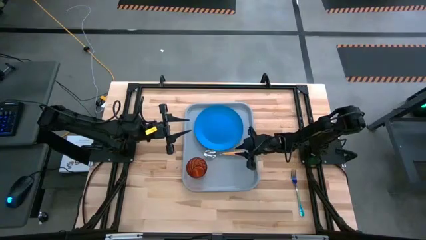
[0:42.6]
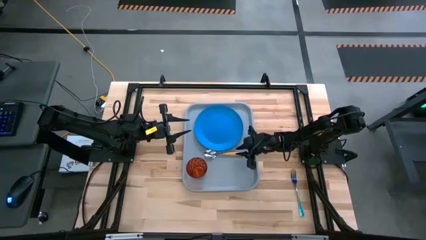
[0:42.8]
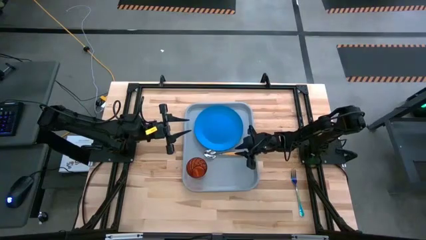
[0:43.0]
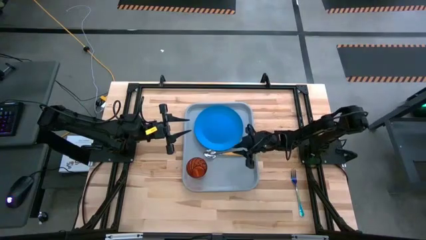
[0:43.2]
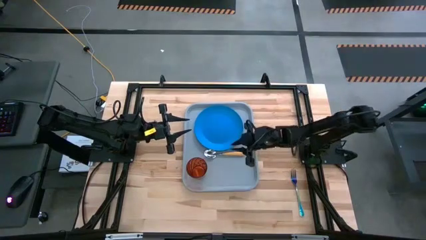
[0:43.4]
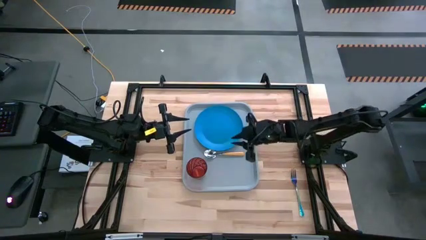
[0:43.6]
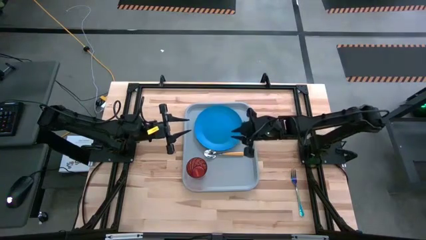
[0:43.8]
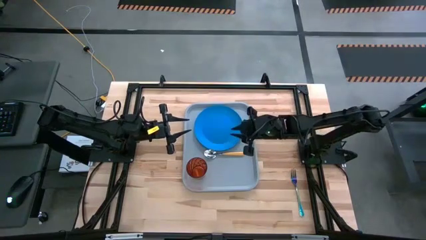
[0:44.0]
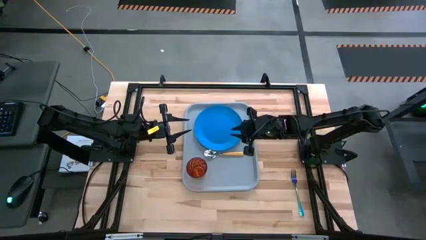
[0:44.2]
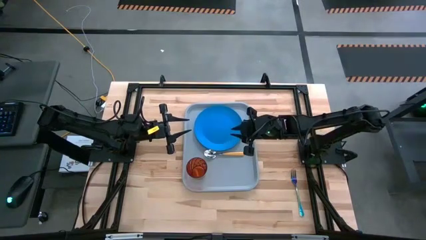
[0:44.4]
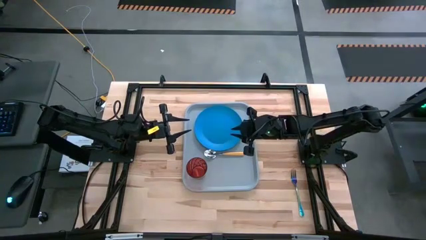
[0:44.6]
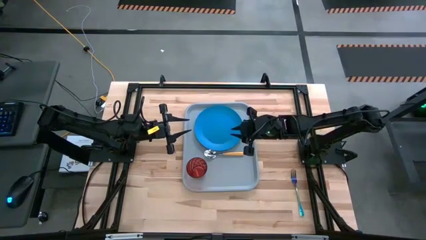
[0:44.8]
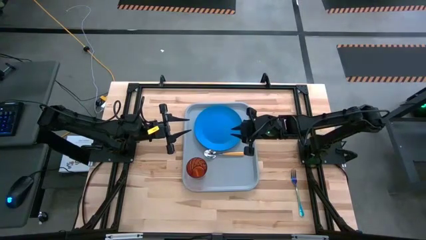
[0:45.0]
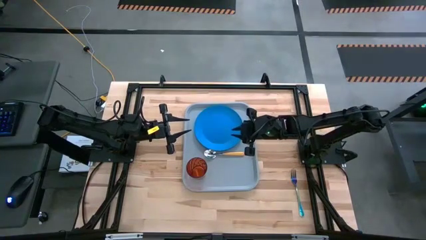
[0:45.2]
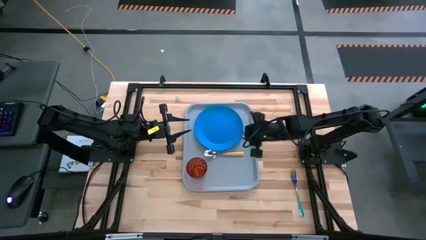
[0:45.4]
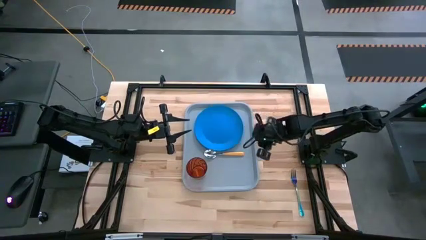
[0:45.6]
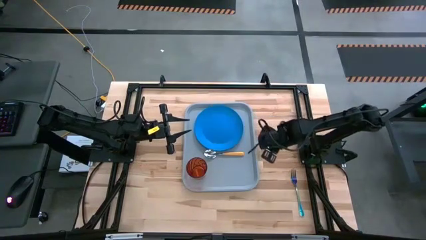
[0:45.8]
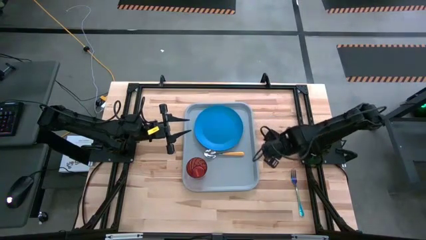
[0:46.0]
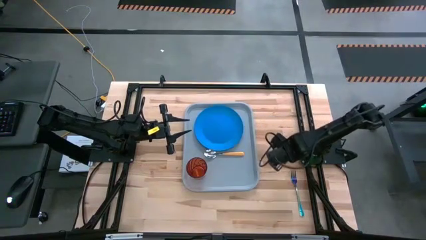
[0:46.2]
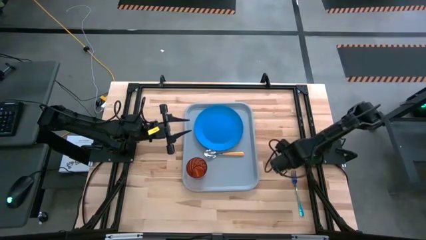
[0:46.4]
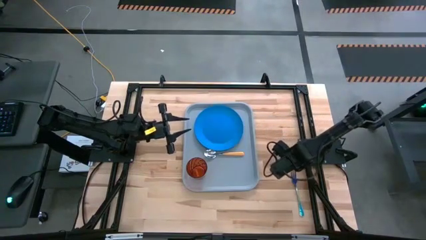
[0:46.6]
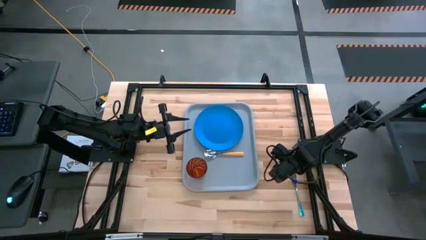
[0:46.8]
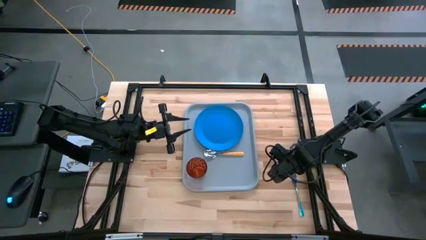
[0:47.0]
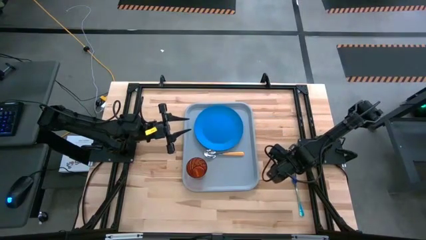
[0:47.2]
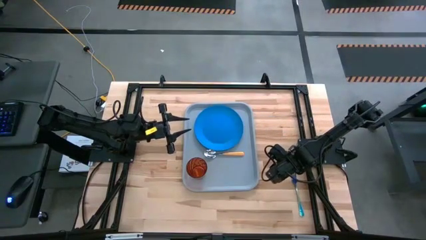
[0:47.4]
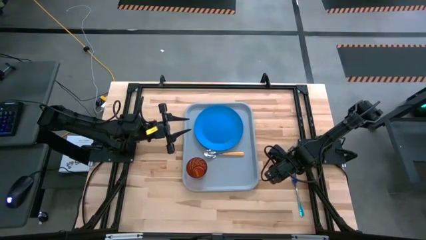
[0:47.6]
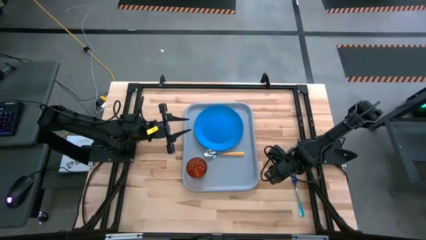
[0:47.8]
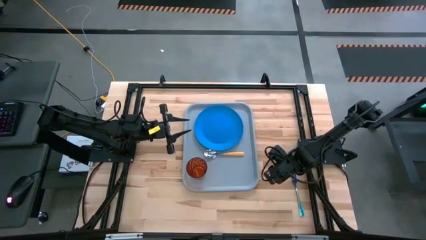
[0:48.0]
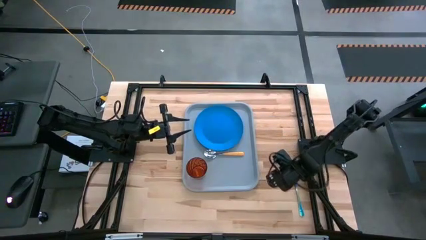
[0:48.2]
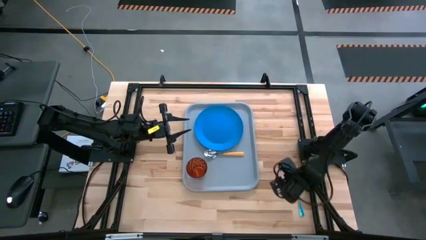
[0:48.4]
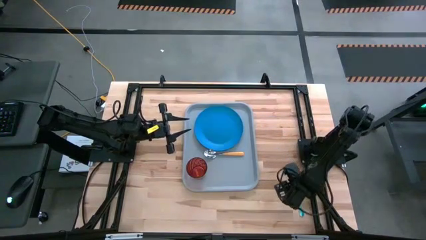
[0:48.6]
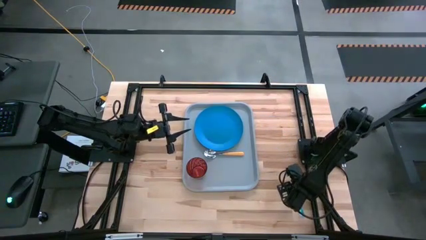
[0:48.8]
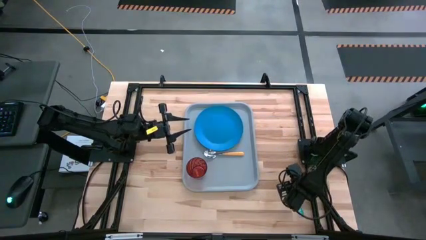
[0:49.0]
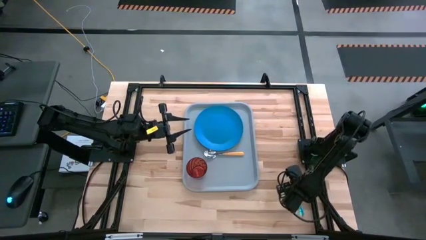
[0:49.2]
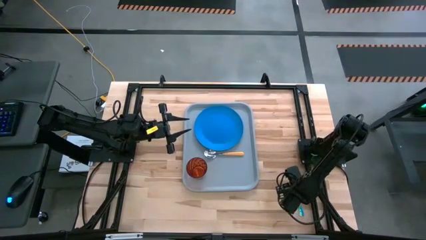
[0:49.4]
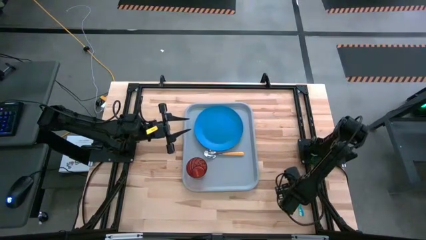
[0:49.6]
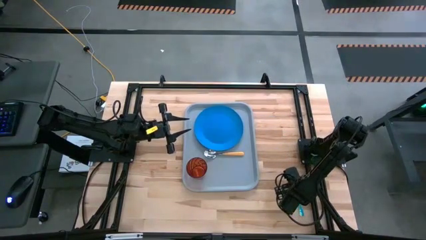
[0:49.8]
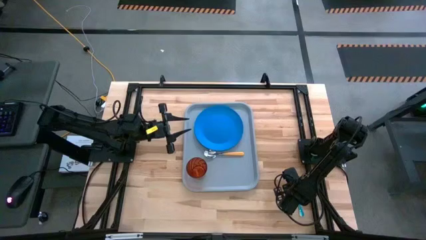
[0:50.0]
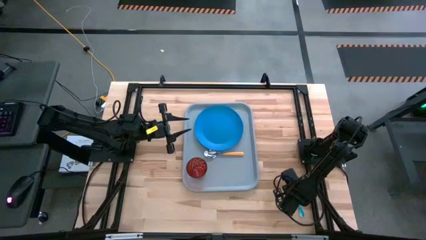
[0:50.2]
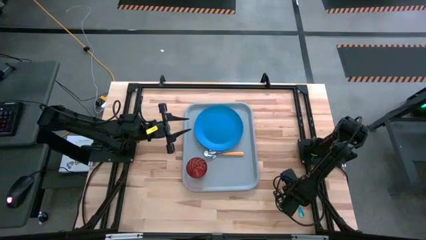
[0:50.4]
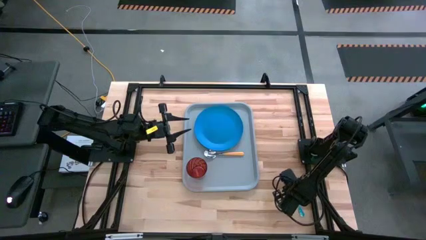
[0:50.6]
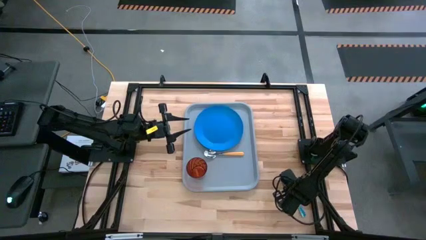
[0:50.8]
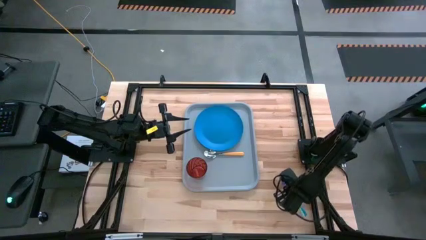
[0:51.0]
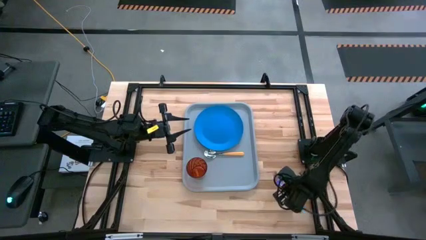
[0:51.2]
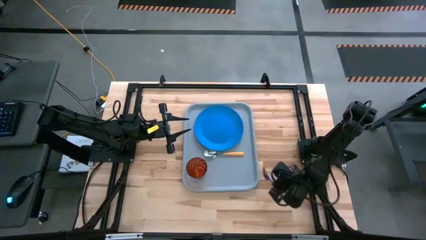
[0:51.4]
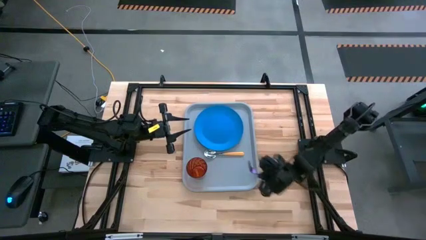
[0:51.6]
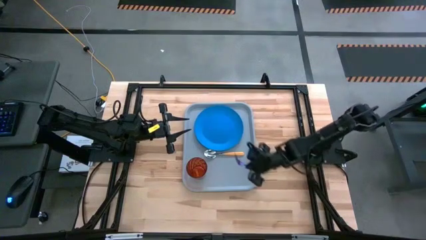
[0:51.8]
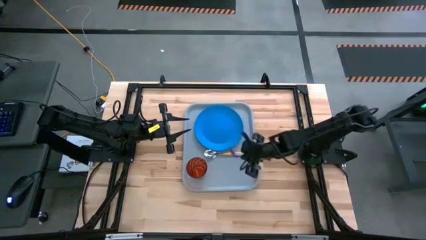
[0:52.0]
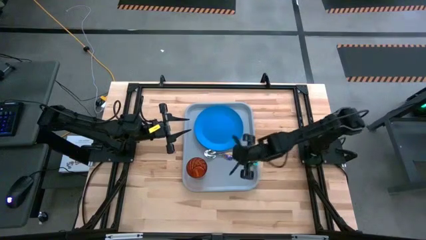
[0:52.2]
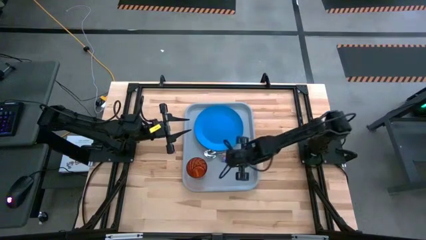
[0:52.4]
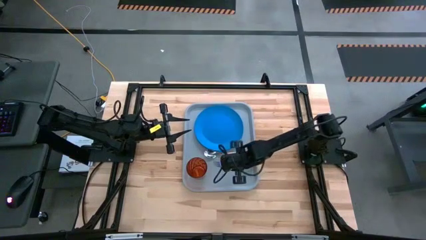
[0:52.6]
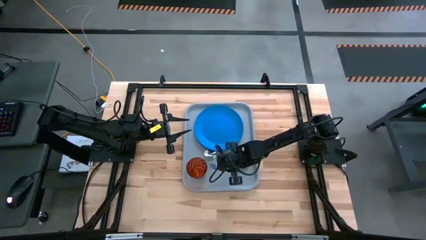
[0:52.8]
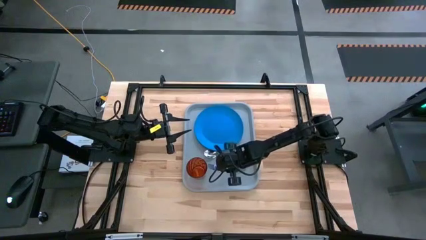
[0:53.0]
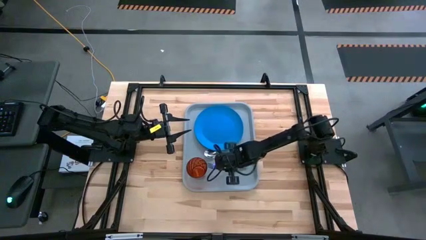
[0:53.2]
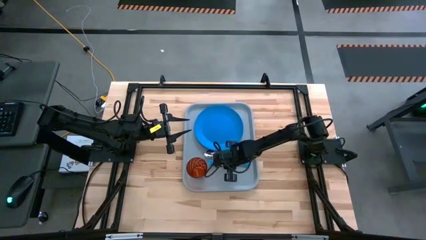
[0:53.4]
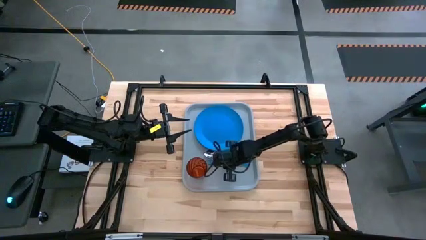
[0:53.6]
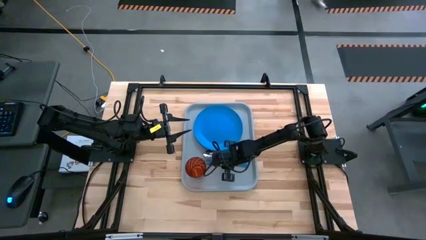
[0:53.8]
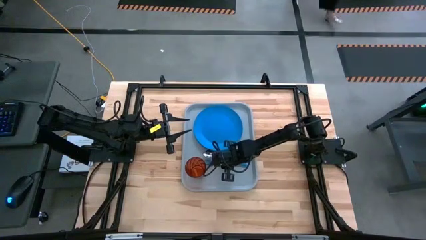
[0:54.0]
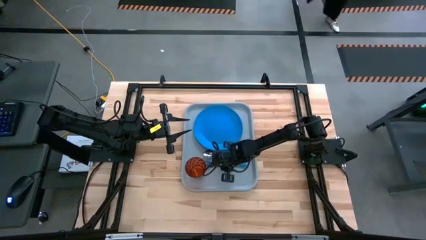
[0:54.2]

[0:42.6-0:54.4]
Task: Pick and place plate/cup/fork/spoon on tray
Put the blue fork on the gray serving tray to the left of the yellow spoon

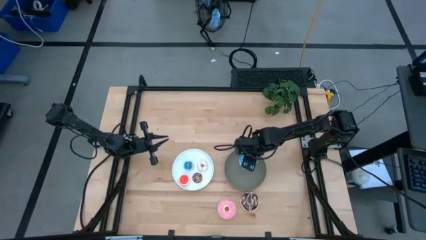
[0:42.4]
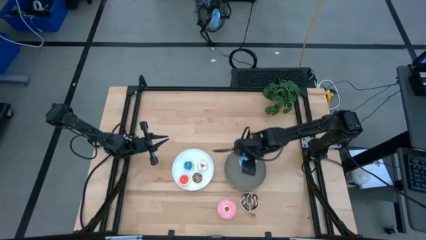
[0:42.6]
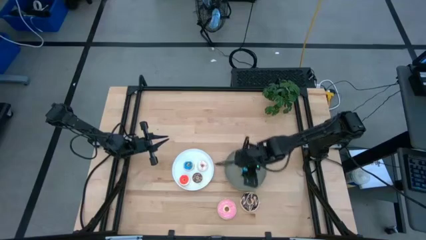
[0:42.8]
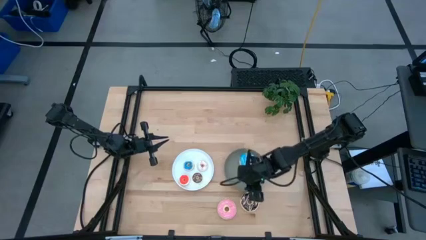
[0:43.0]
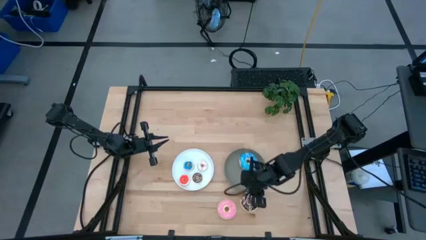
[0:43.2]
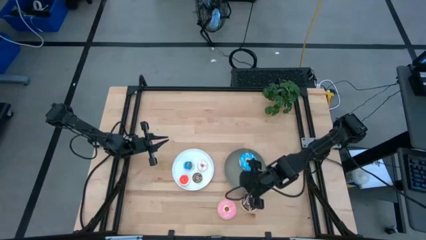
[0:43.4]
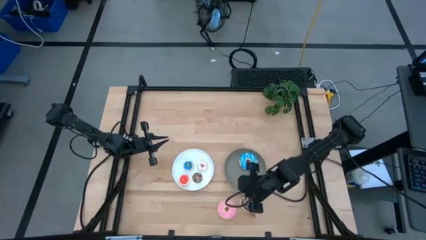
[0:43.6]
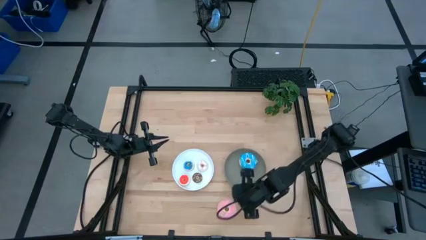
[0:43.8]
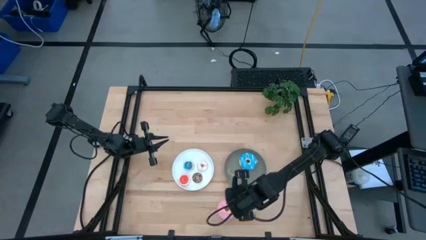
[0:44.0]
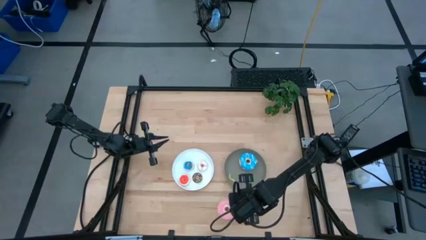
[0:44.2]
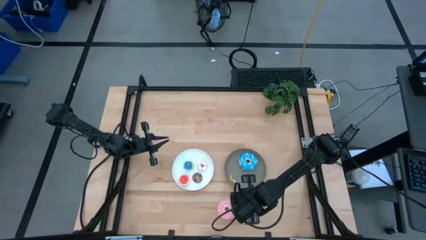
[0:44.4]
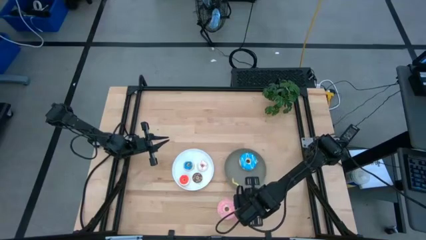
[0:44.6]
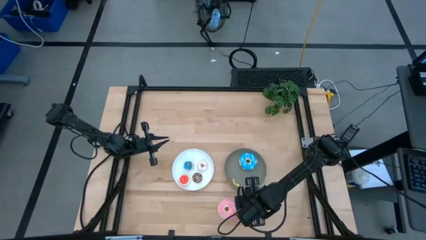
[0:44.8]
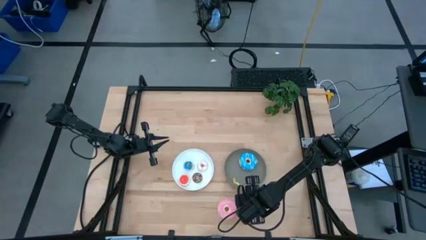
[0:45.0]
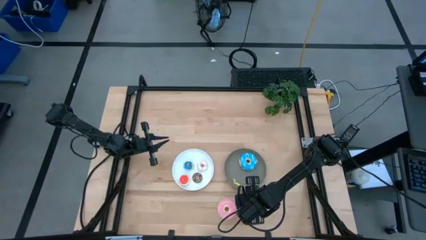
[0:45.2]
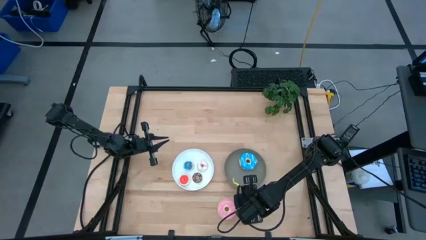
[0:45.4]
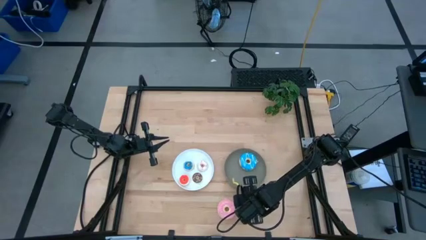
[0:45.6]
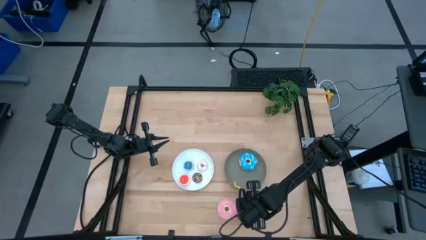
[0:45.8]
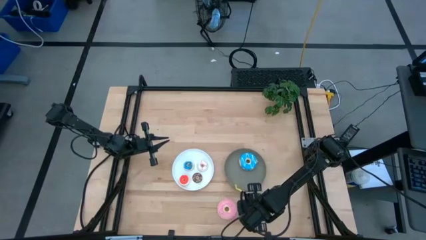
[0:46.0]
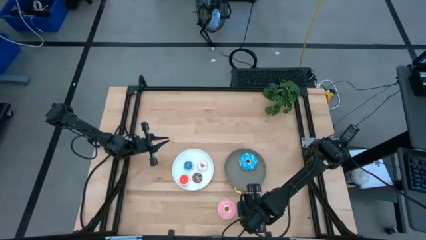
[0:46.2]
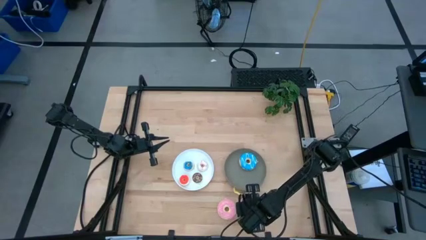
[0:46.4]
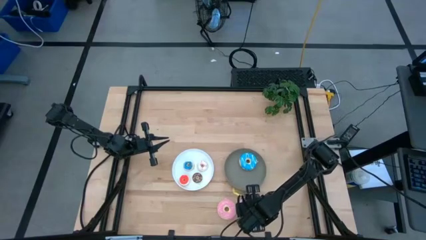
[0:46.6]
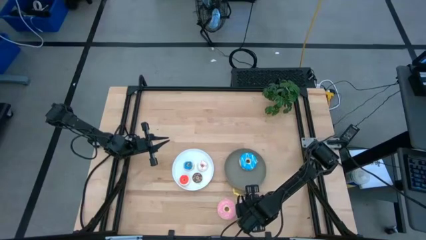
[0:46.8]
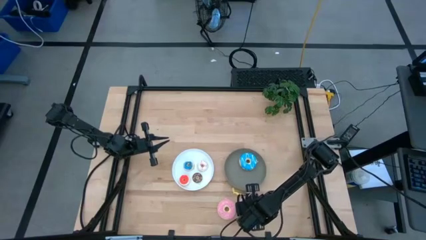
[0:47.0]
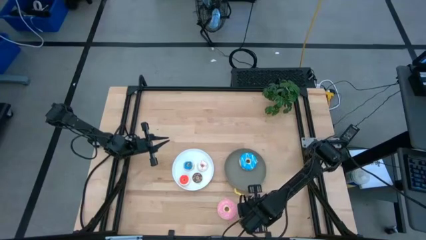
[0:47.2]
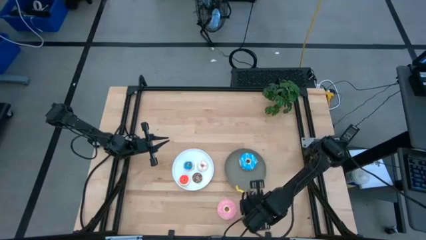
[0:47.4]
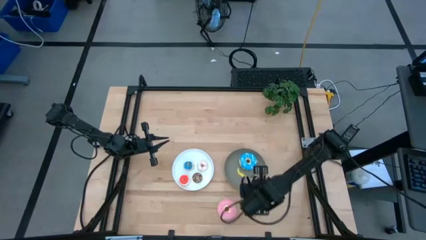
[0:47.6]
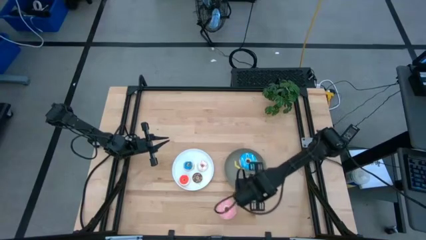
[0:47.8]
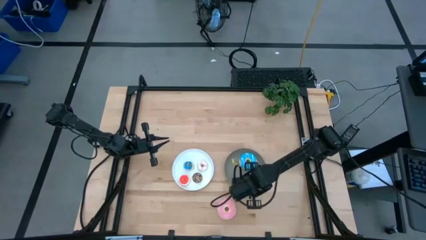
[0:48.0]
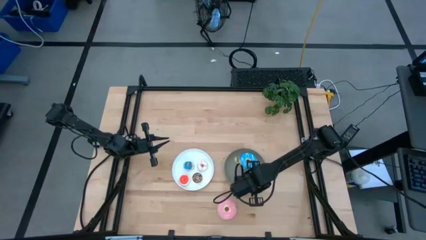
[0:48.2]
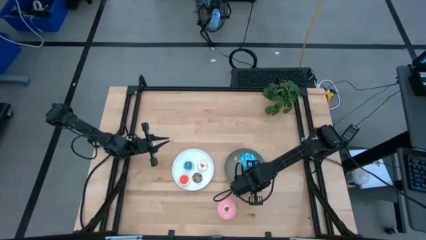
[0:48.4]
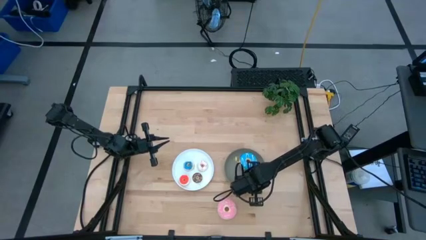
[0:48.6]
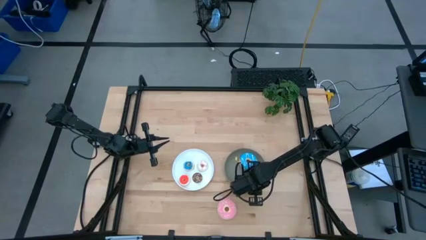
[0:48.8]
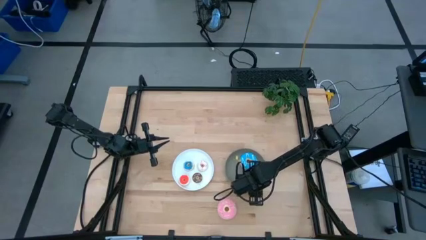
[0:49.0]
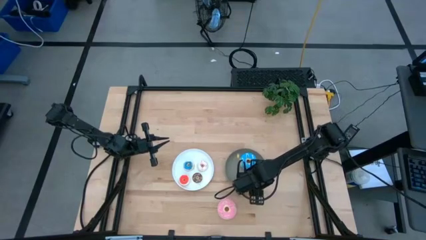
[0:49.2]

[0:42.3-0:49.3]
Task: Pick & Place donuts
Put the large black donut on the gray plate
